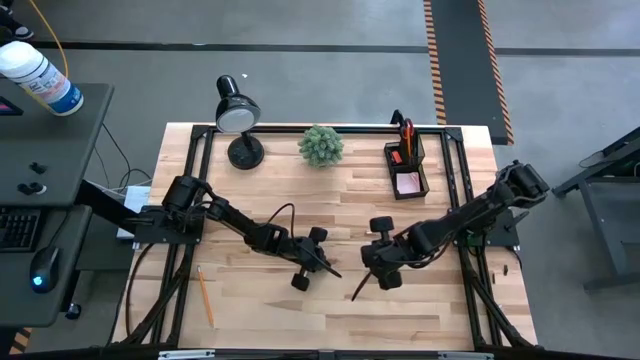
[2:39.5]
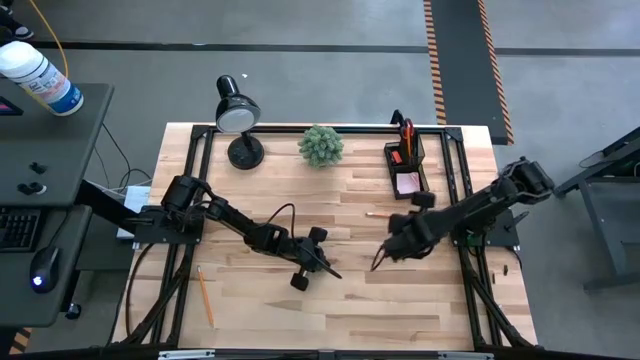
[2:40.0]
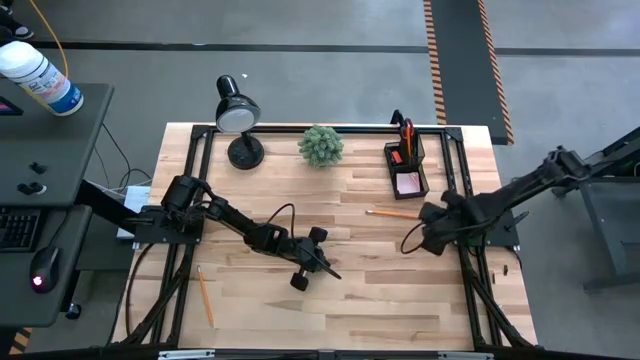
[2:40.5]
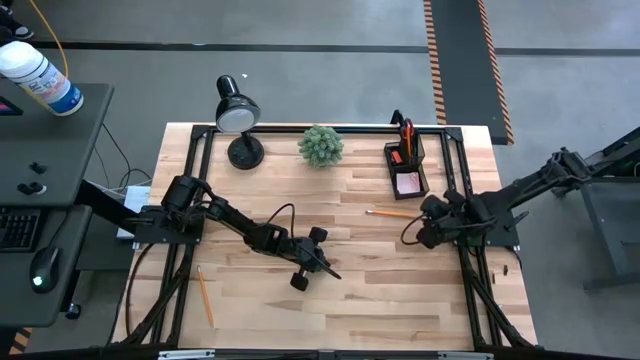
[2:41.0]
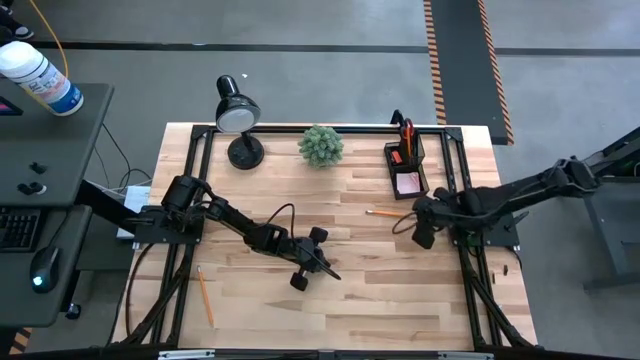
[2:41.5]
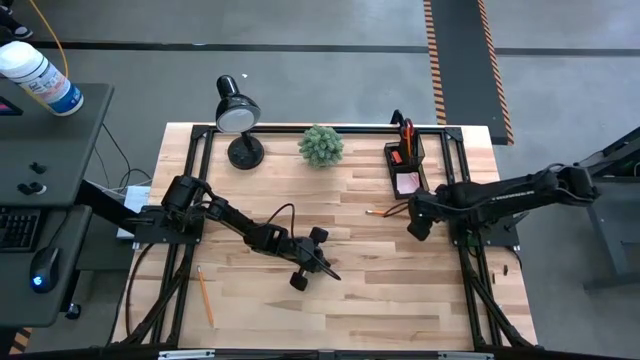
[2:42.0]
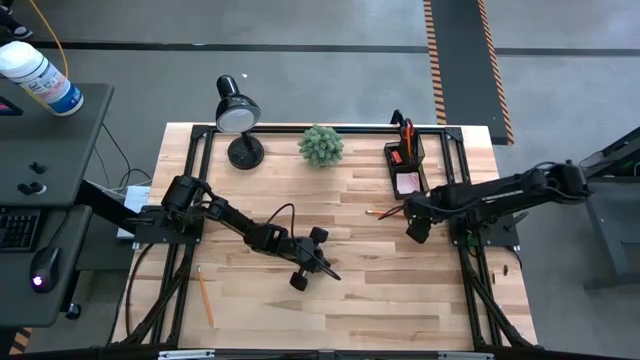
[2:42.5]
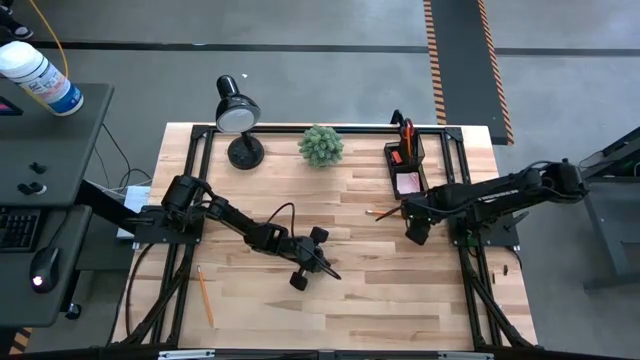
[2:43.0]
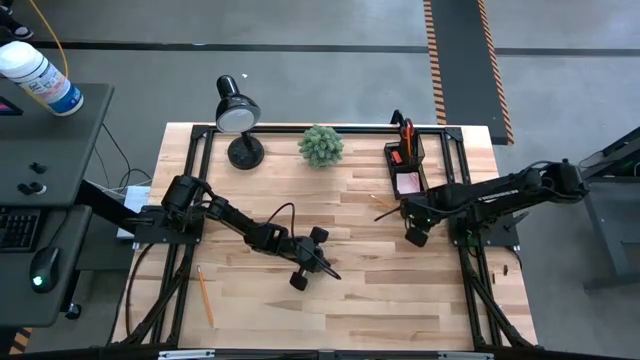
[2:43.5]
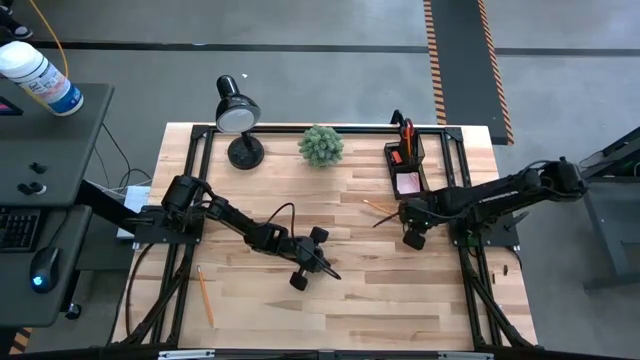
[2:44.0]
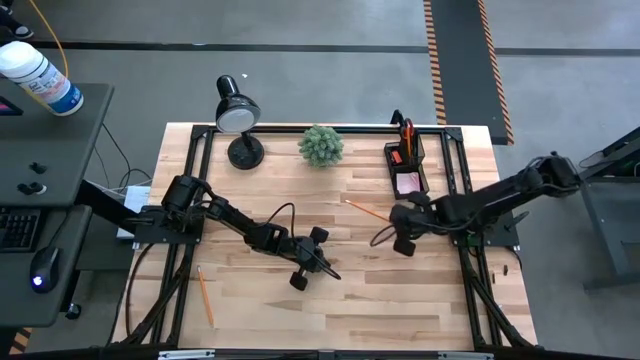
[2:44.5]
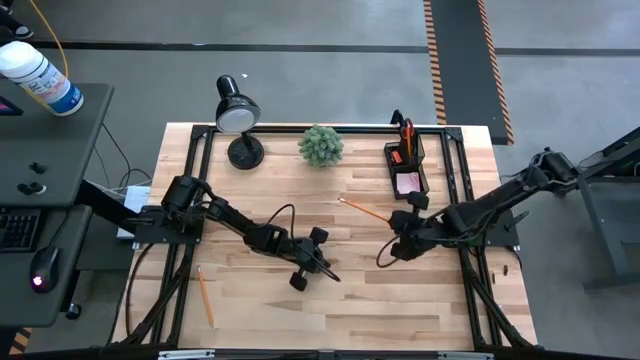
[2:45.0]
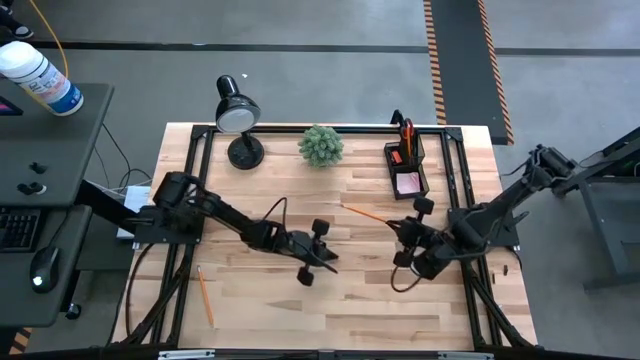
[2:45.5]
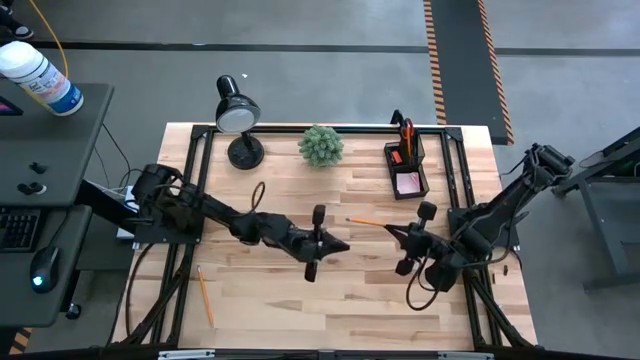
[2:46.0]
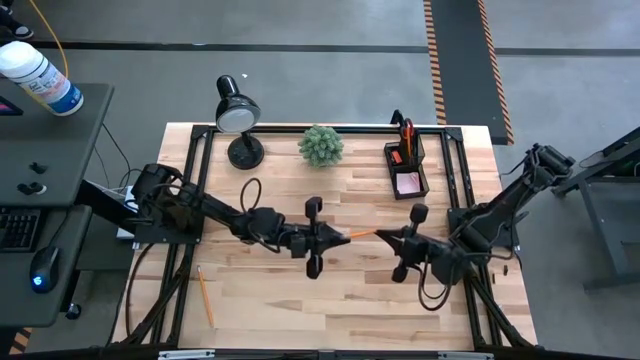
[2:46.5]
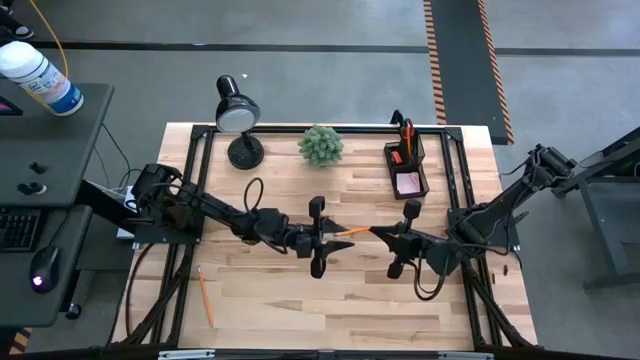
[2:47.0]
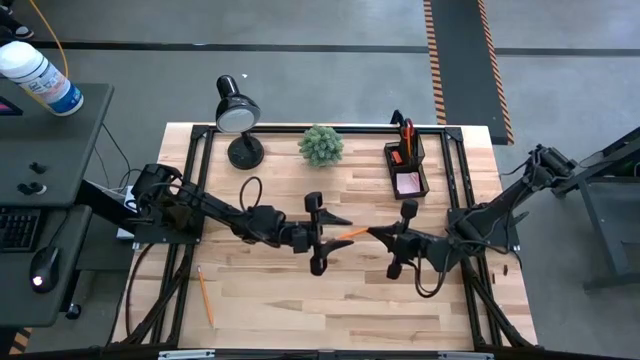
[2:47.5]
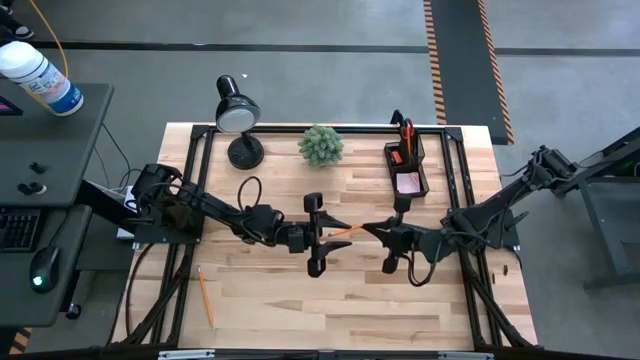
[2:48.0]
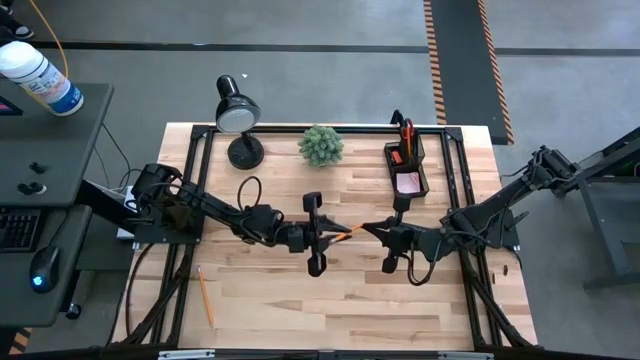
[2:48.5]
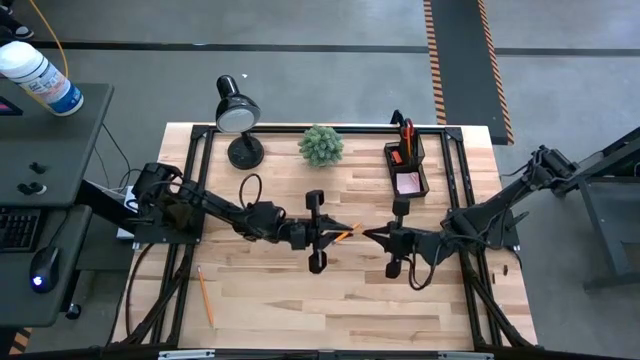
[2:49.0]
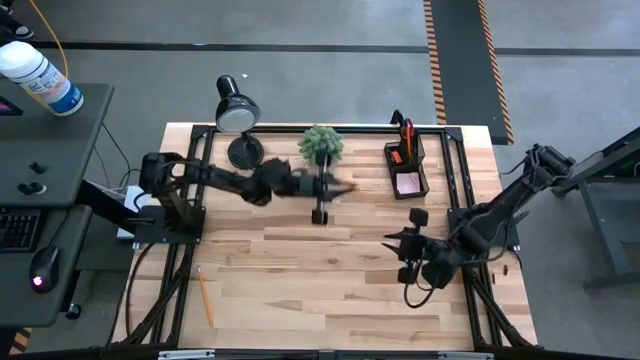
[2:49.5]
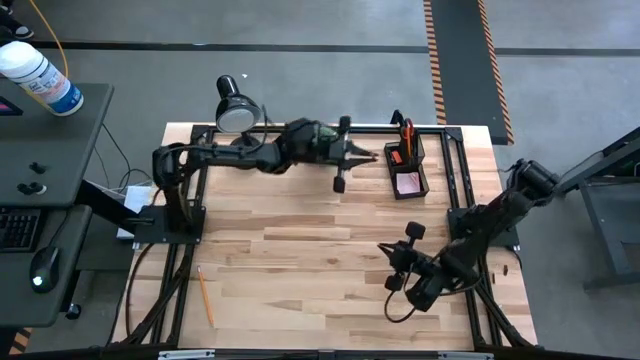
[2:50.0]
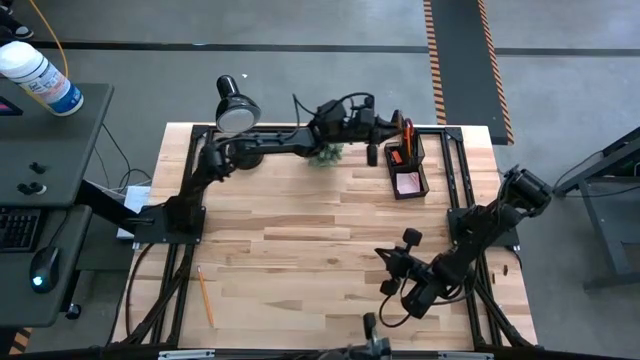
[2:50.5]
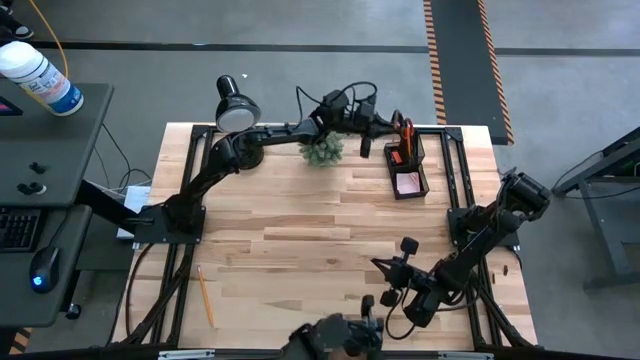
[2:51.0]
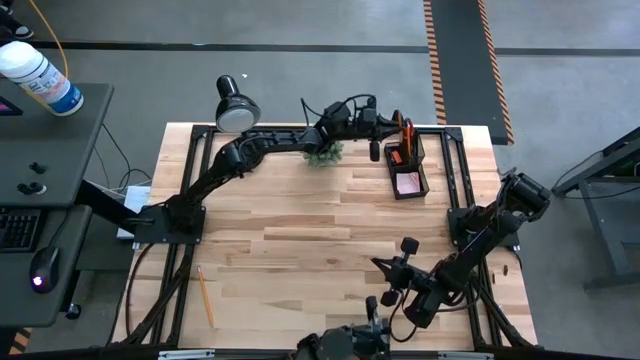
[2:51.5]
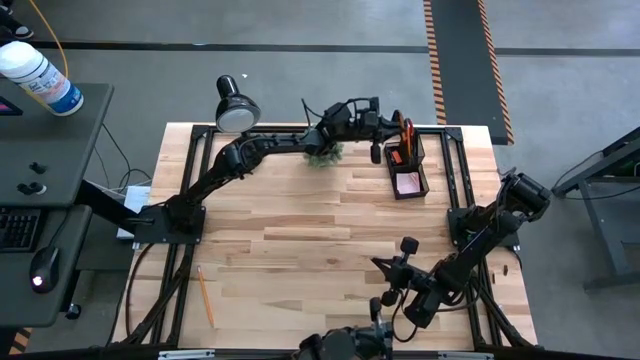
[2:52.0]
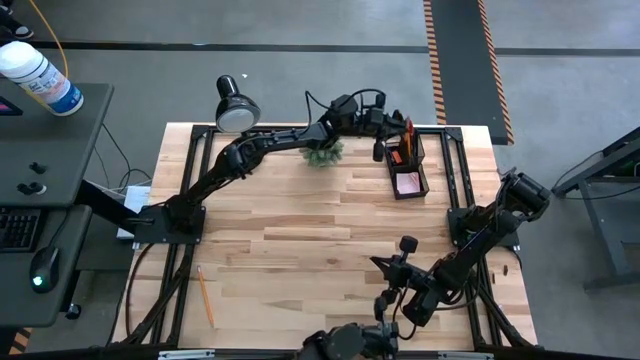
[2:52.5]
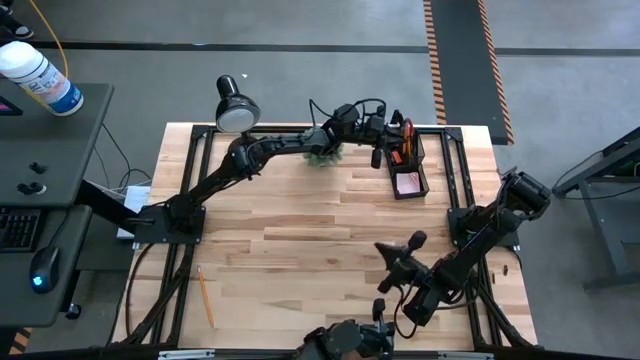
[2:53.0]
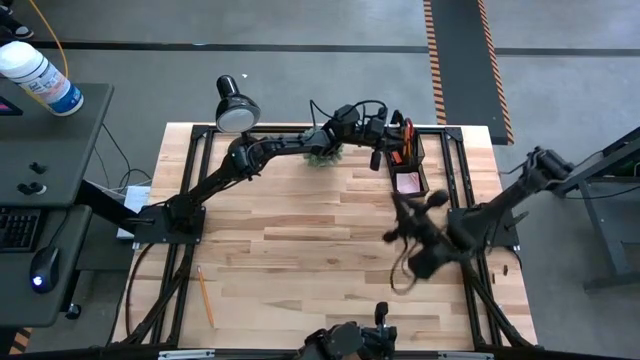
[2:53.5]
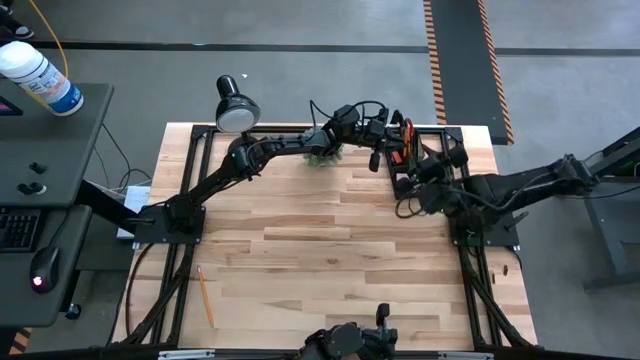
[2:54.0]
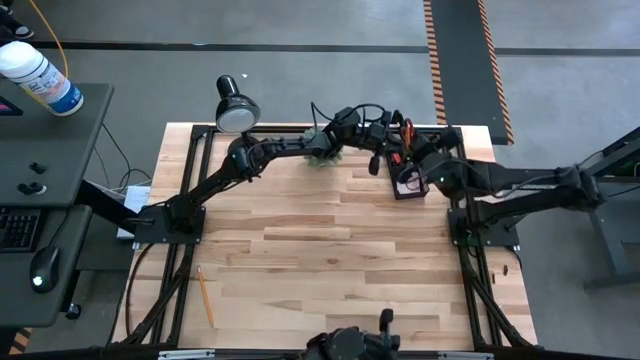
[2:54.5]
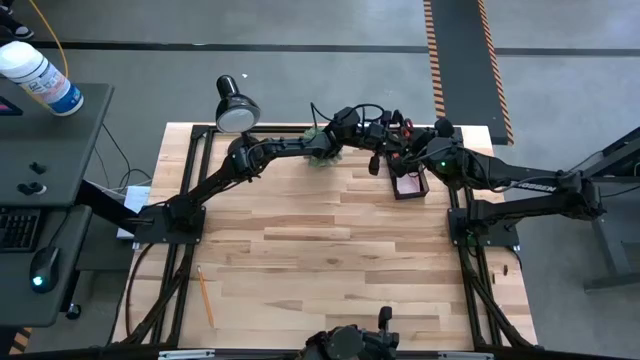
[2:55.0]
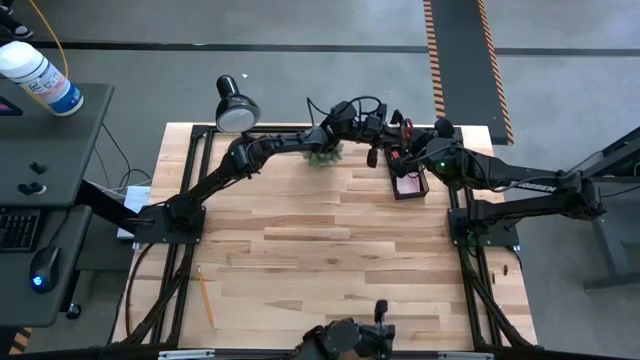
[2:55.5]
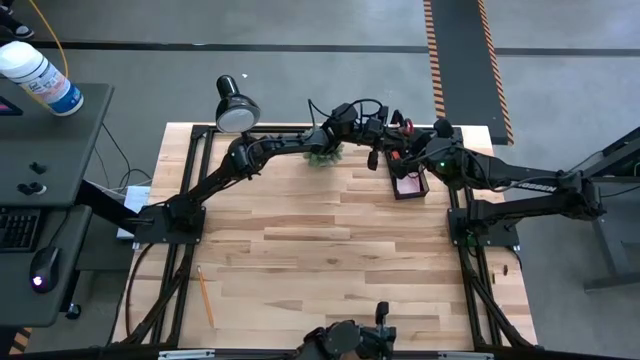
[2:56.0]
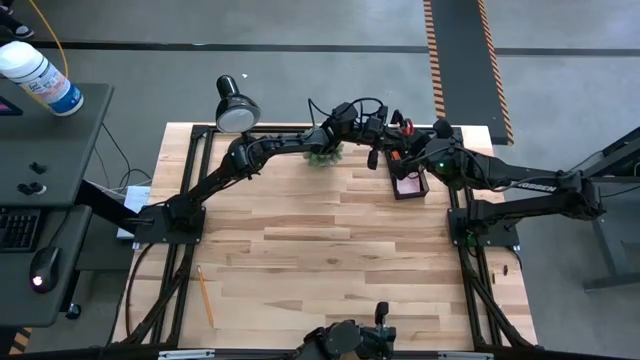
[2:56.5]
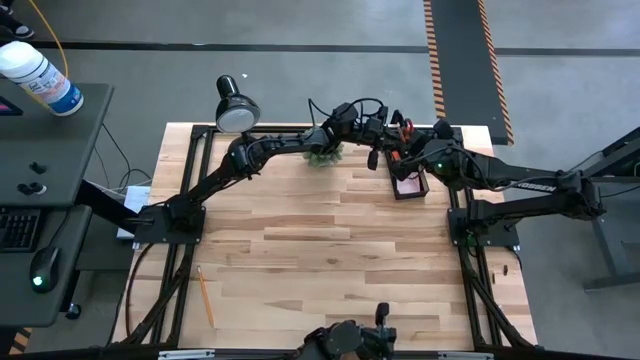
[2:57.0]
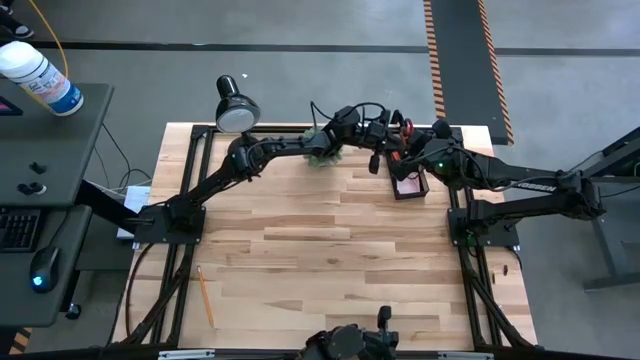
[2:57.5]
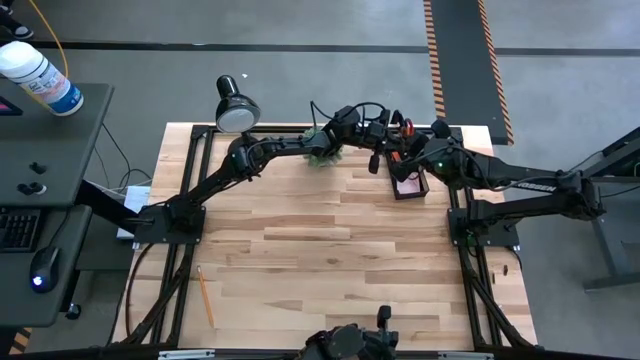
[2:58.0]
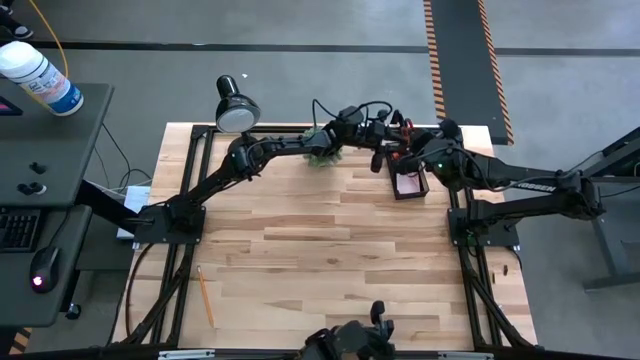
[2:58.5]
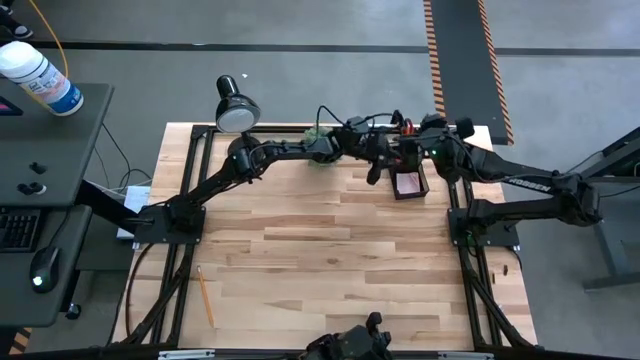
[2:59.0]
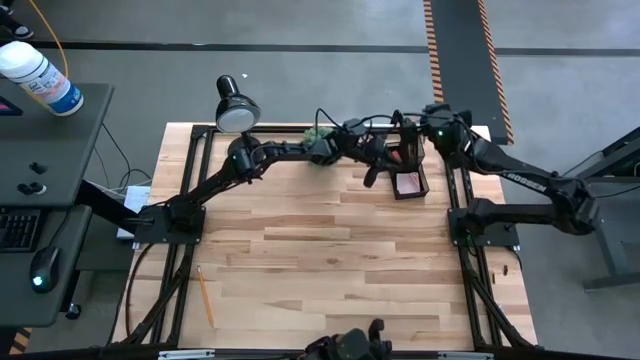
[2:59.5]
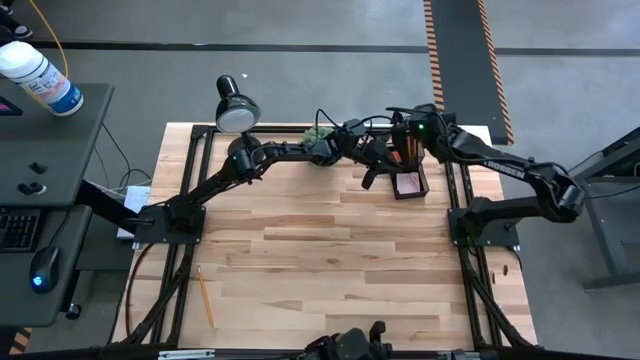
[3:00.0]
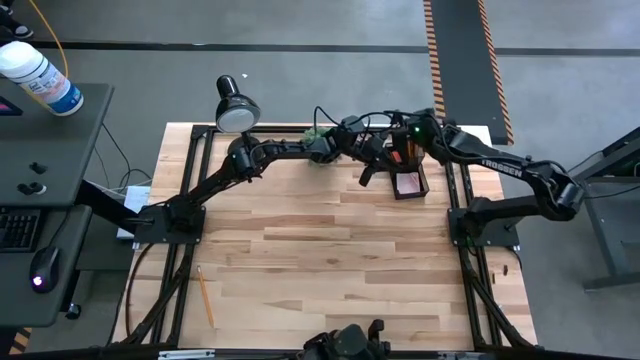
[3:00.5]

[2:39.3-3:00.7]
Task: Pick and place office supplies into organizer
Put the right pencil into the desk organizer
